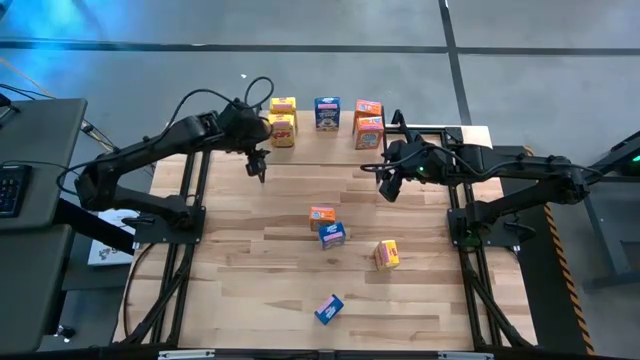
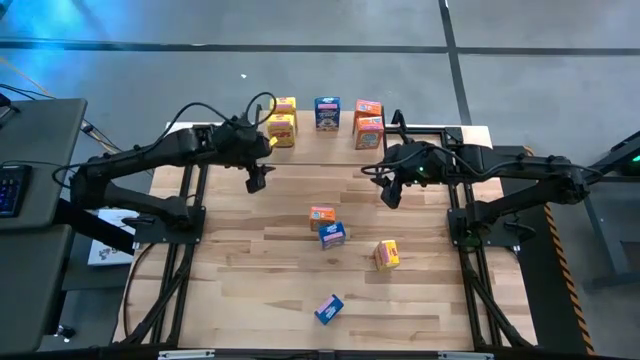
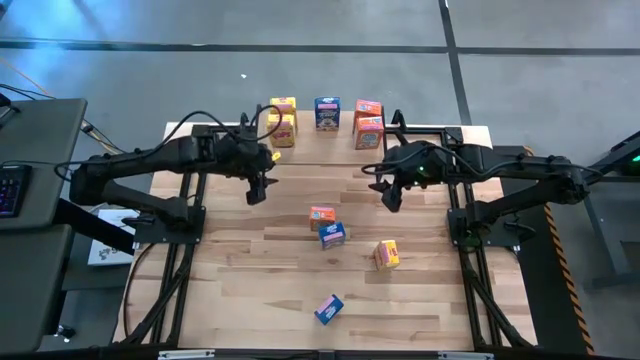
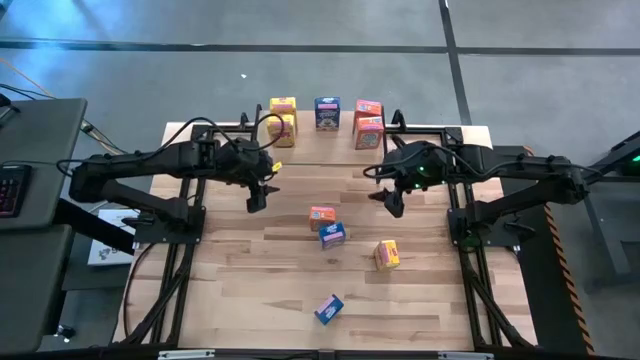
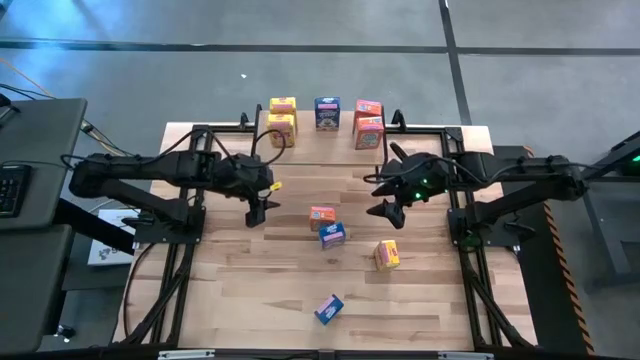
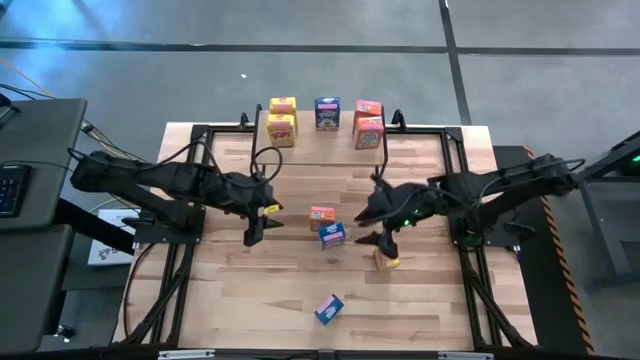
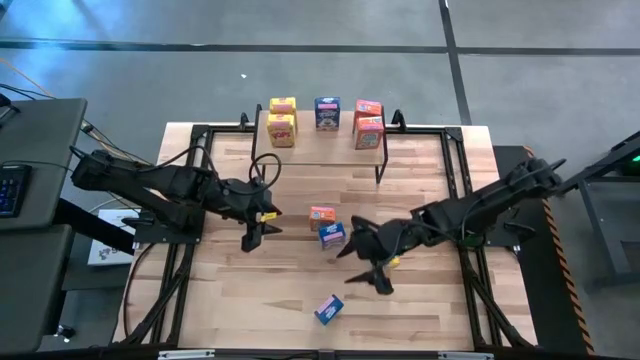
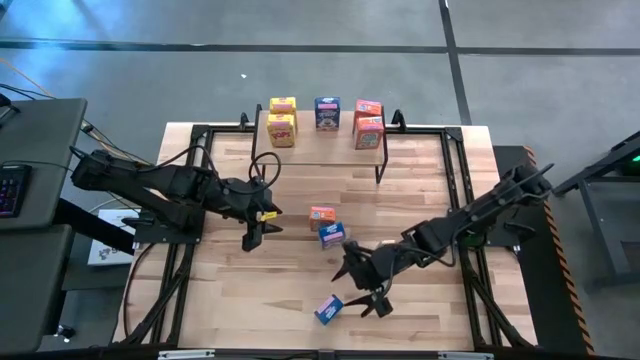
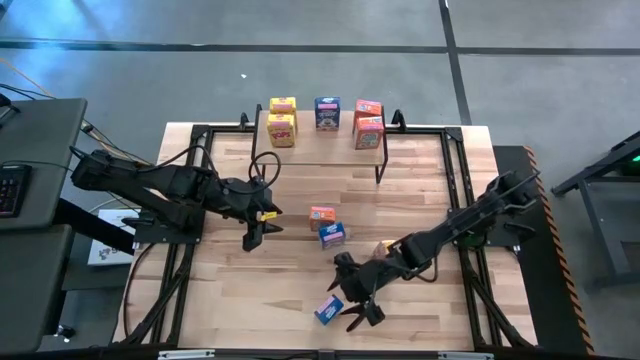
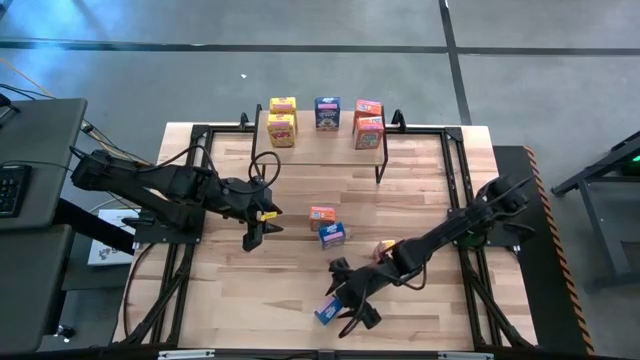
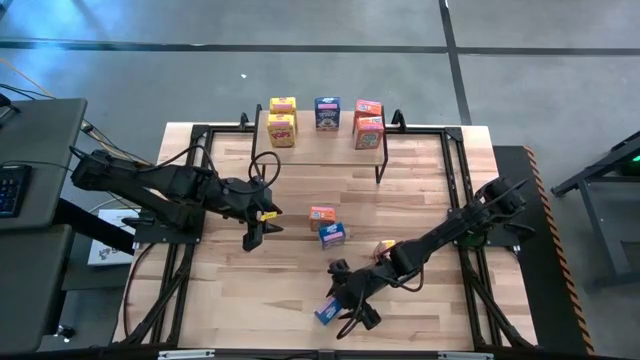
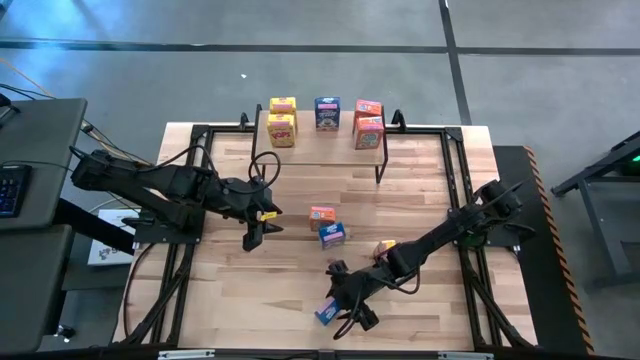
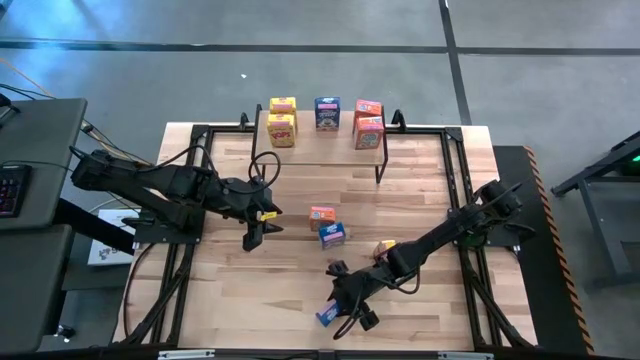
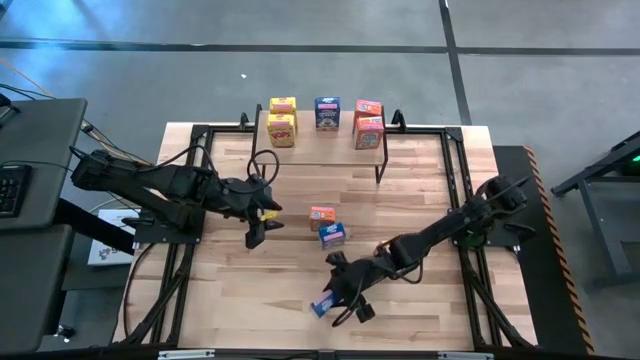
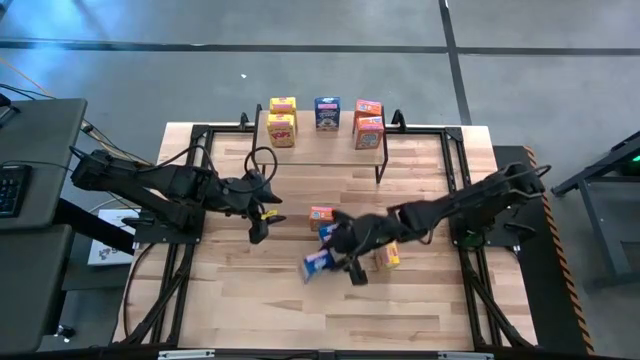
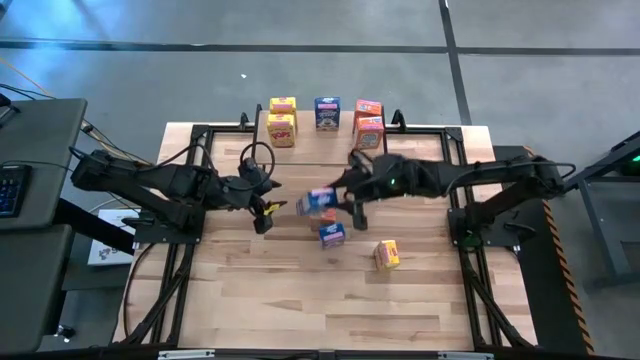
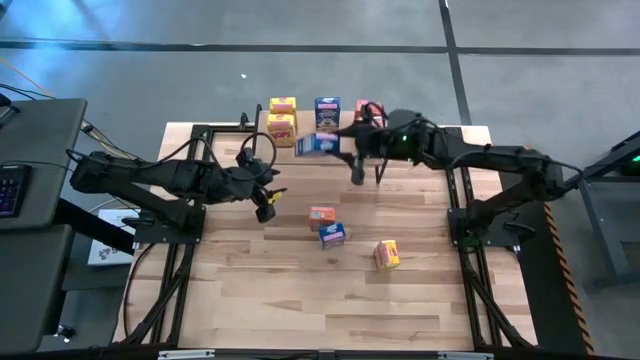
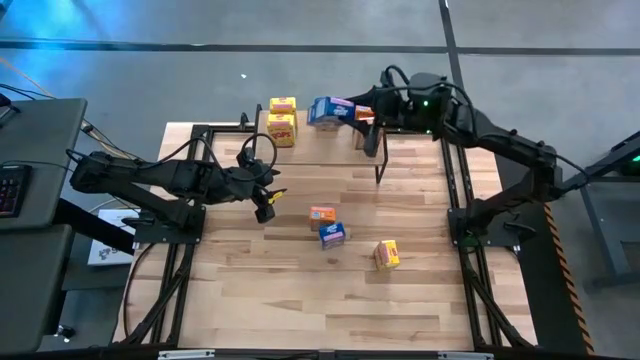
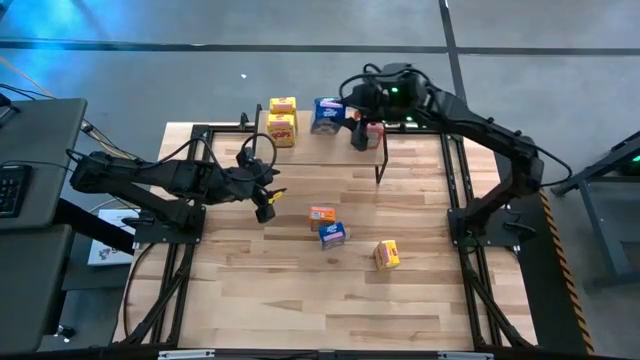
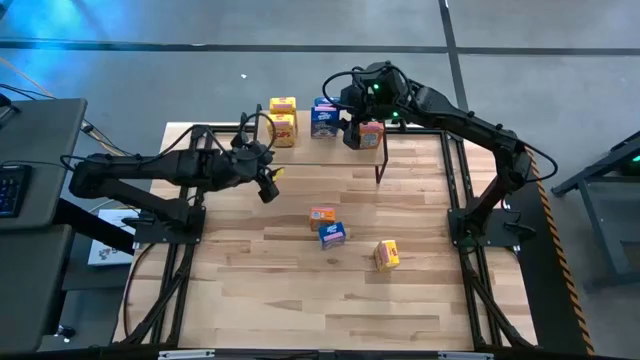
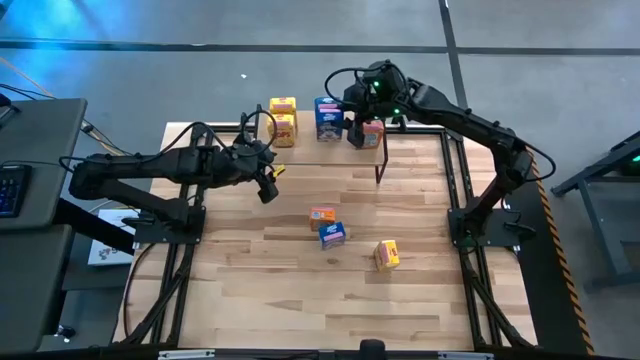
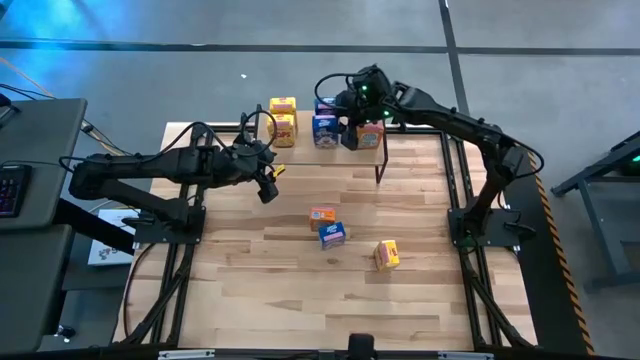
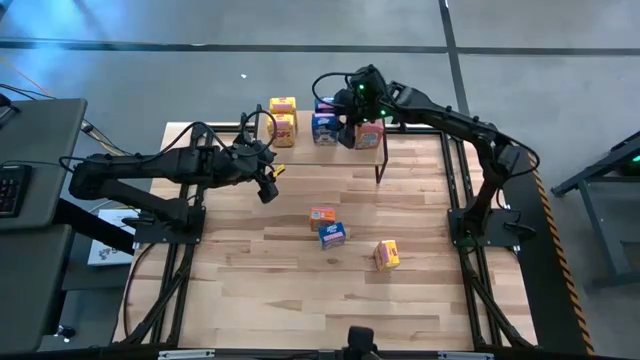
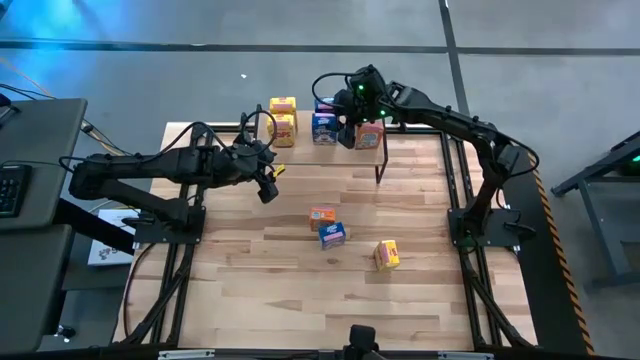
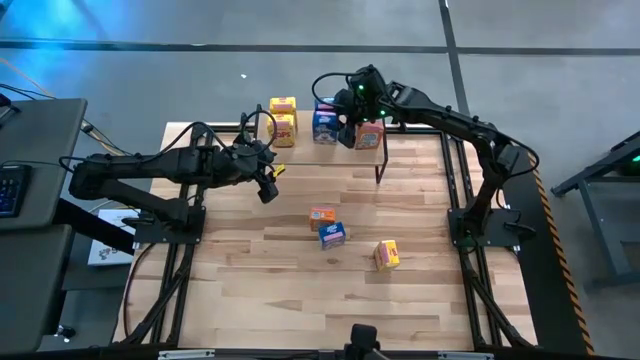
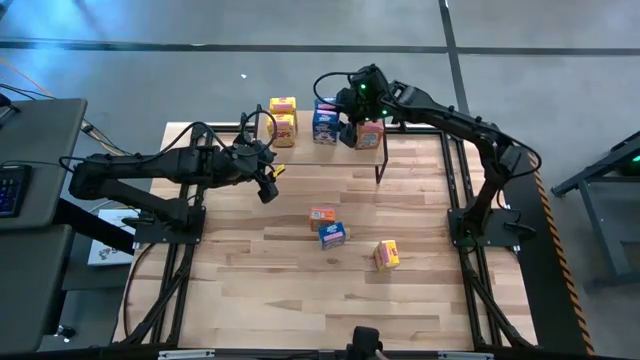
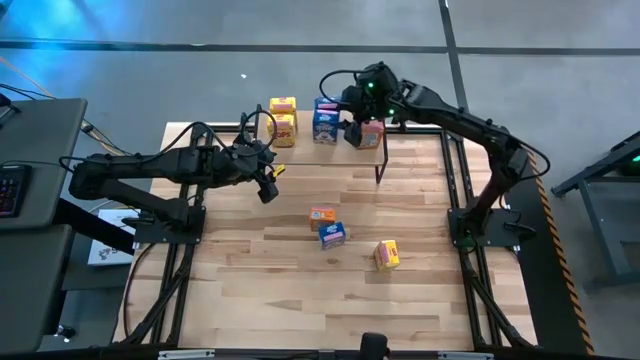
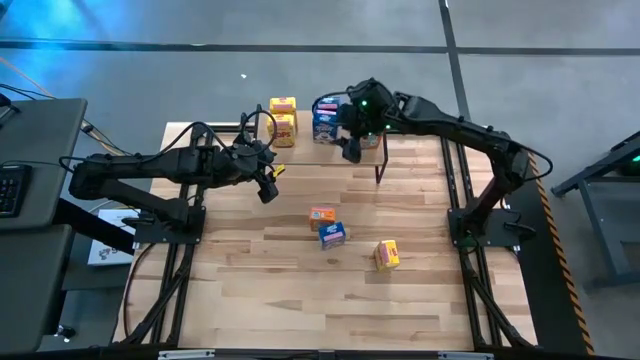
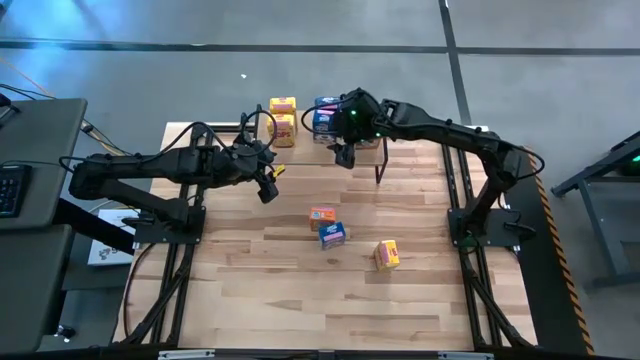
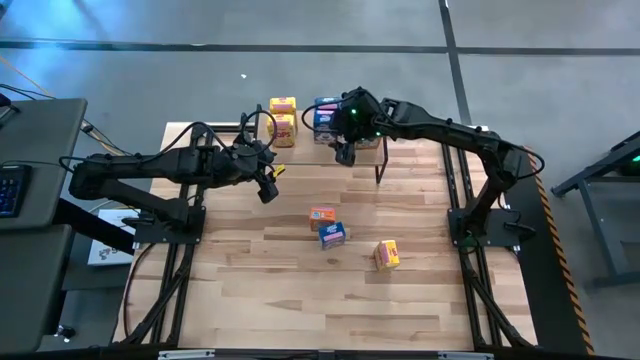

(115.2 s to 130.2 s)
Task: Stack cereal on shelf
Put the bottom blue cereal box on the shelf aligned with the other blue cereal box

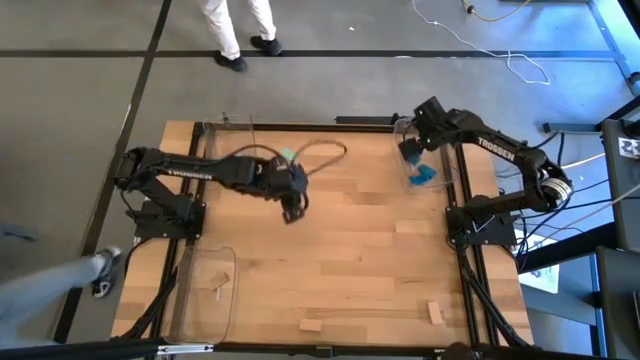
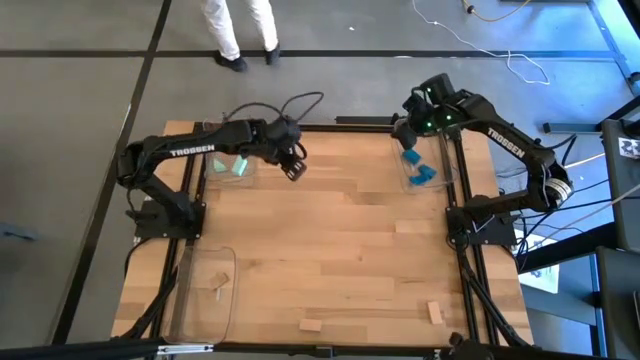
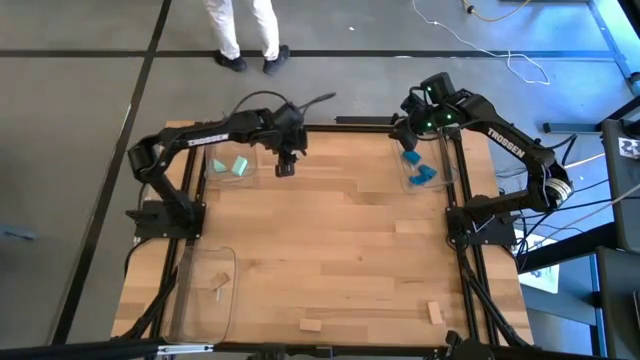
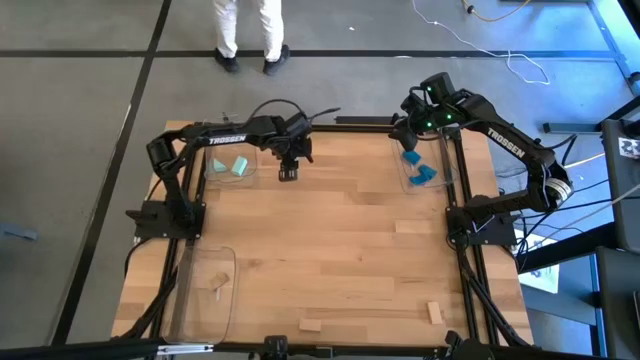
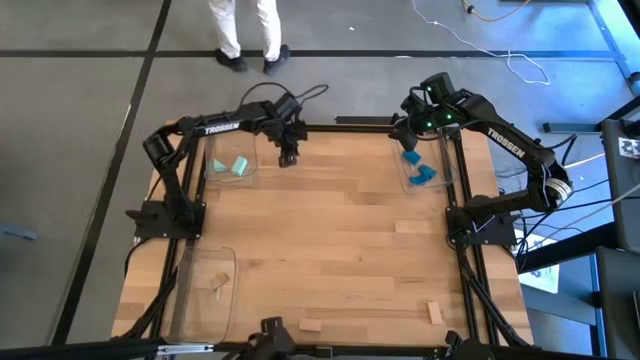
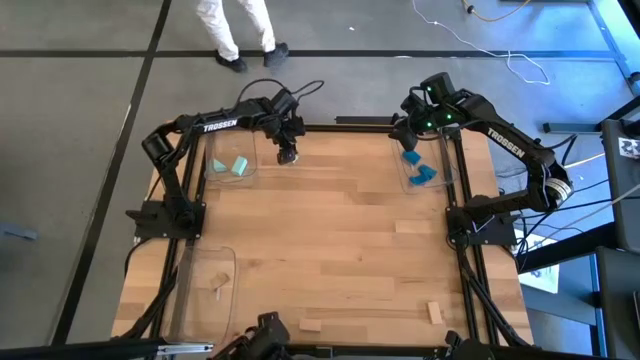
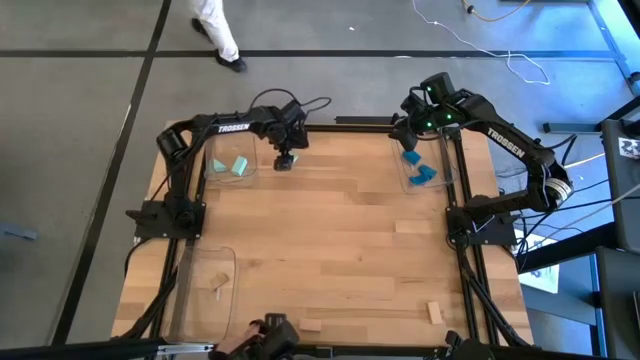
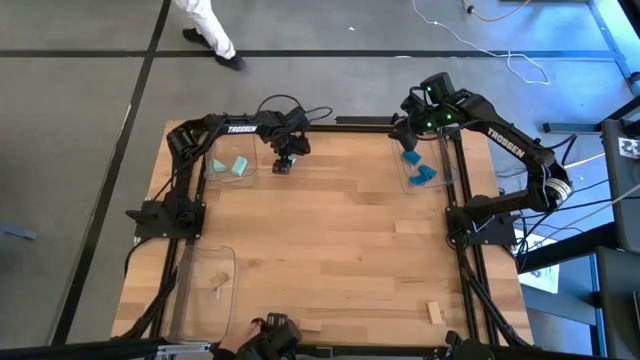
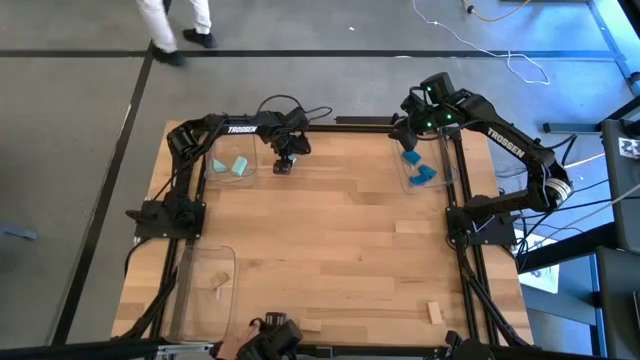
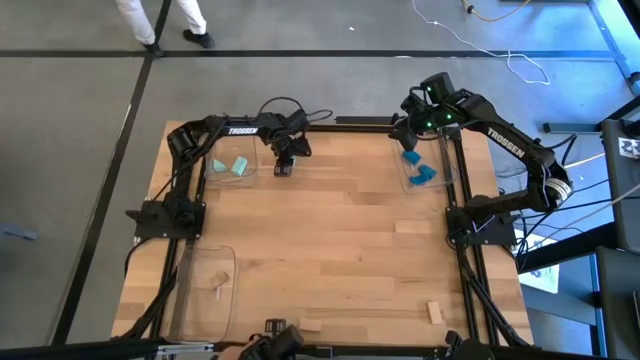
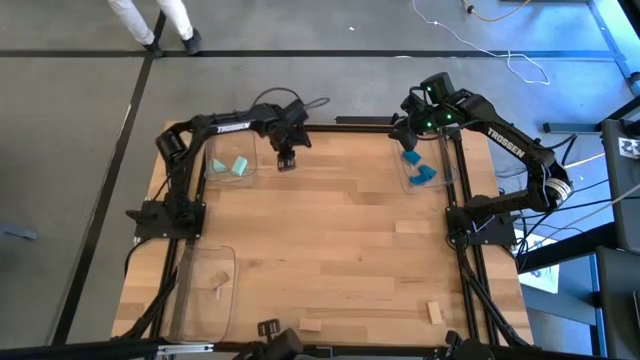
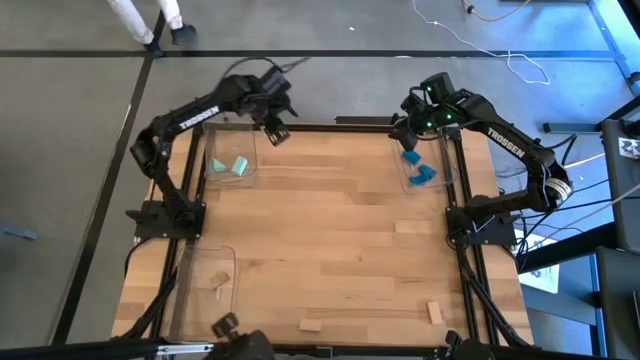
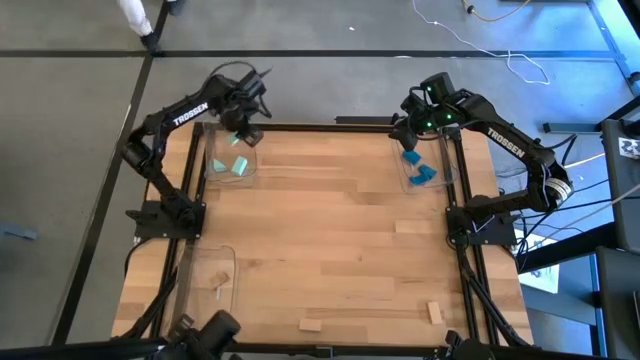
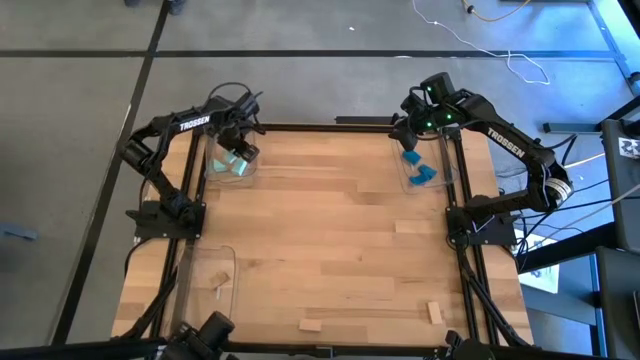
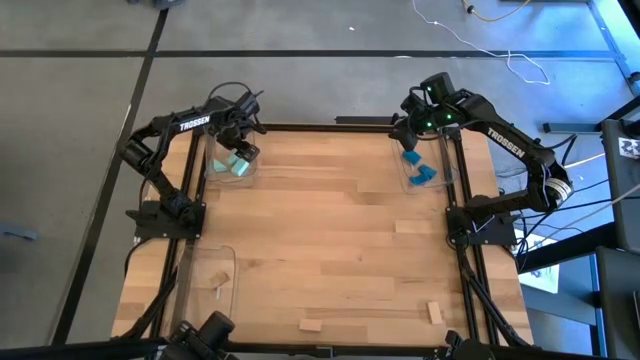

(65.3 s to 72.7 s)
Task: Sort & place blocks by color
Put the light blue block into the top left transparent bin
